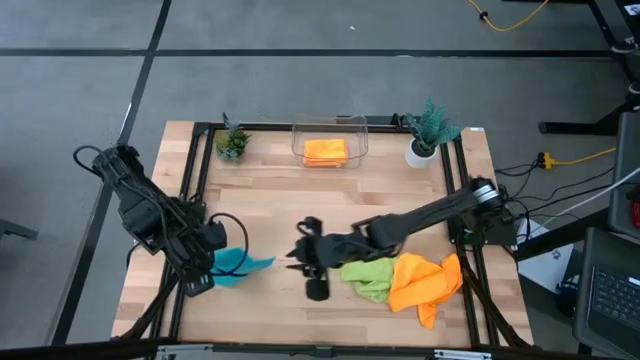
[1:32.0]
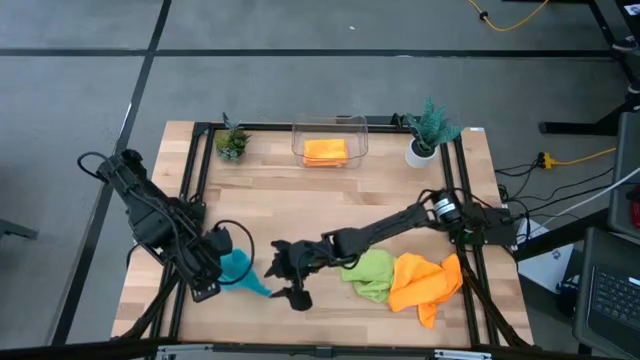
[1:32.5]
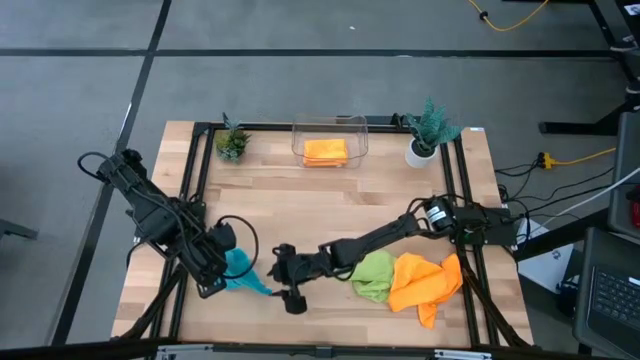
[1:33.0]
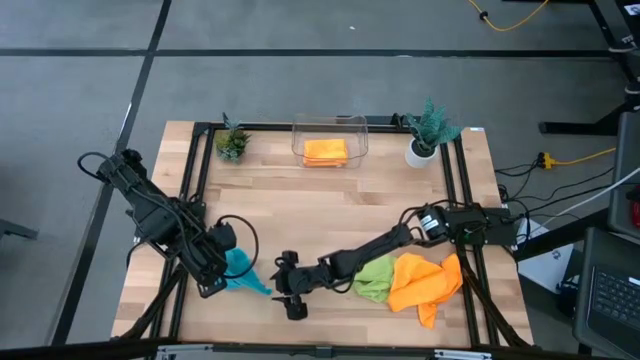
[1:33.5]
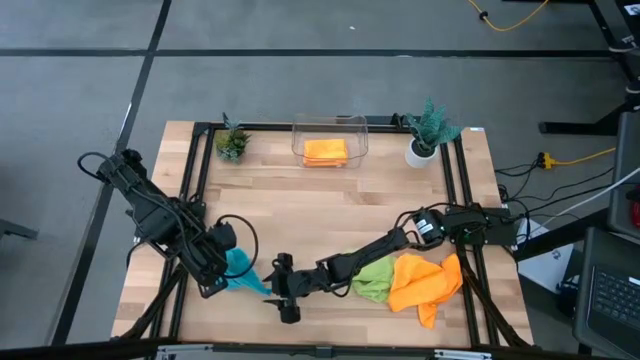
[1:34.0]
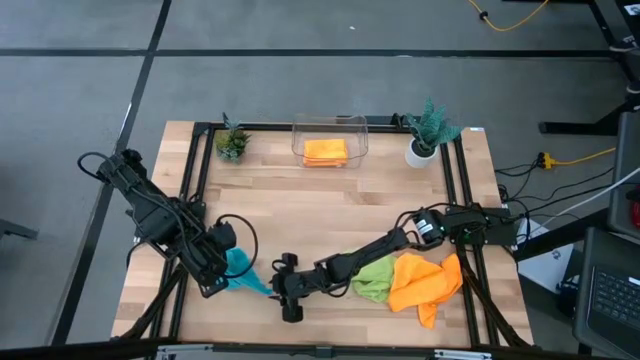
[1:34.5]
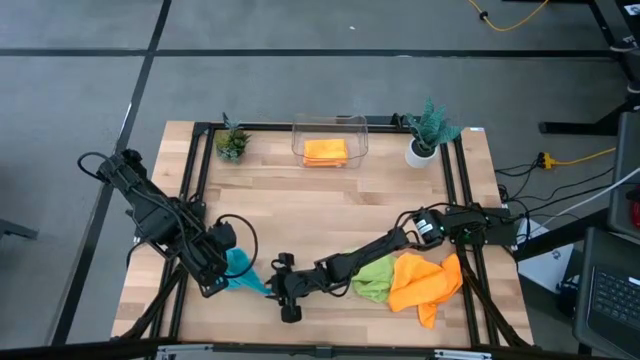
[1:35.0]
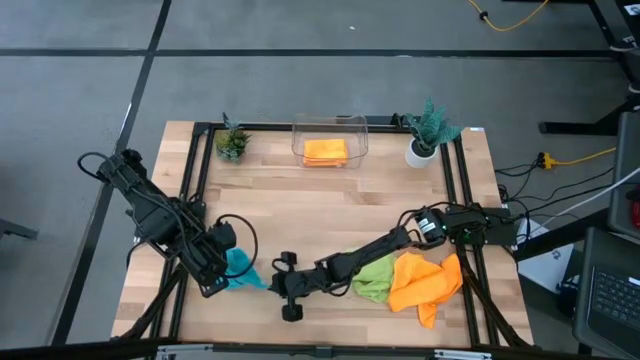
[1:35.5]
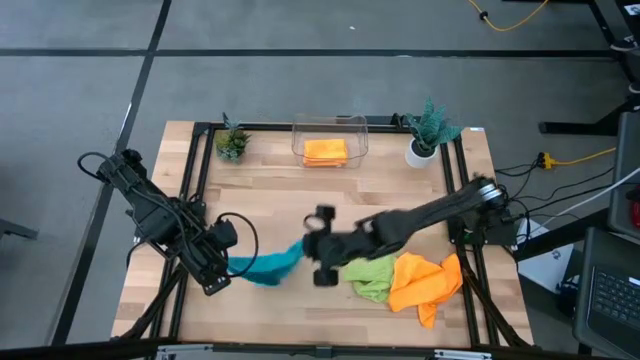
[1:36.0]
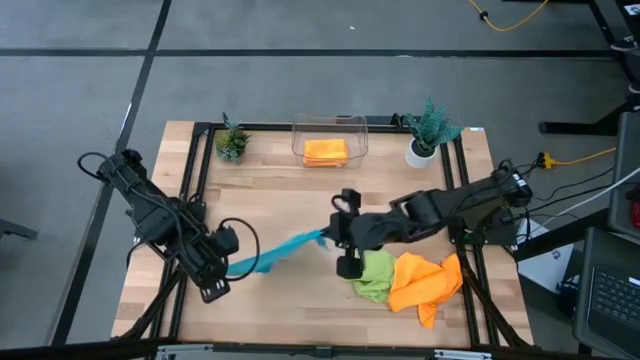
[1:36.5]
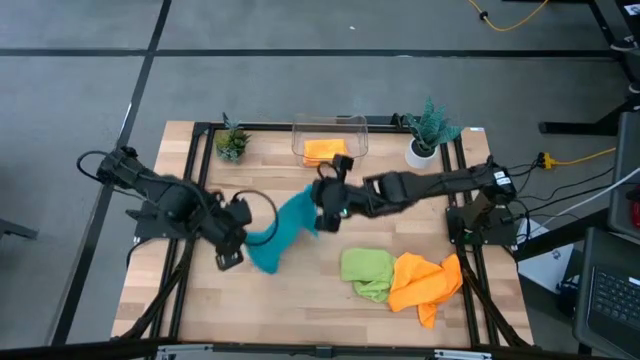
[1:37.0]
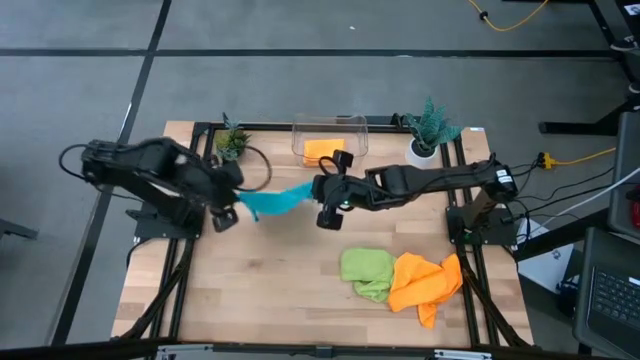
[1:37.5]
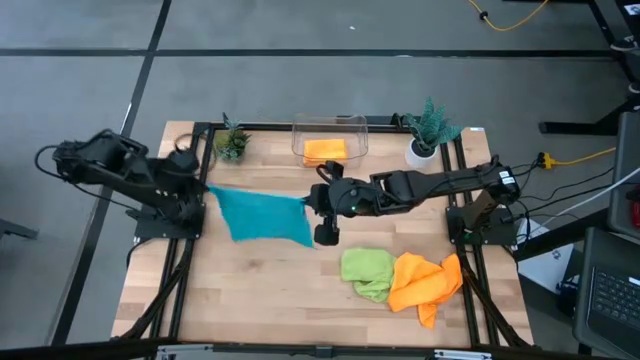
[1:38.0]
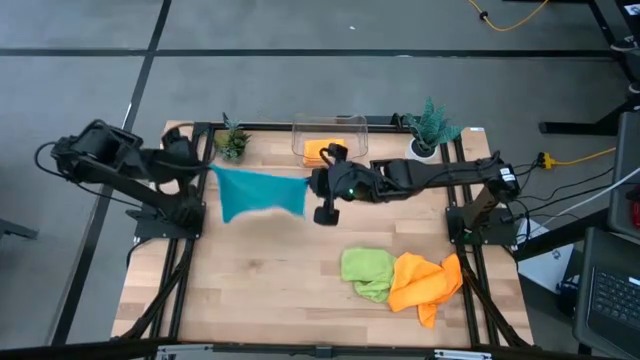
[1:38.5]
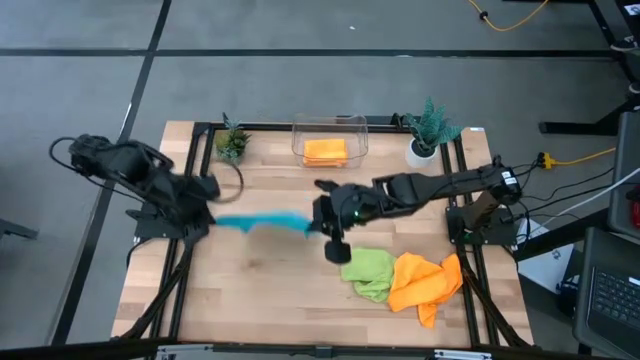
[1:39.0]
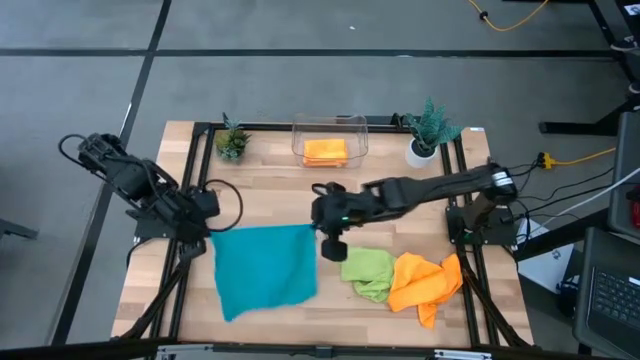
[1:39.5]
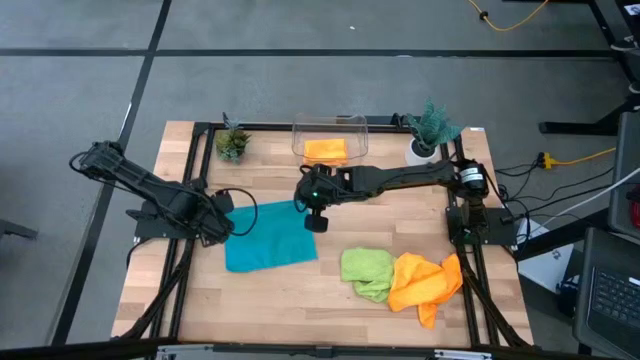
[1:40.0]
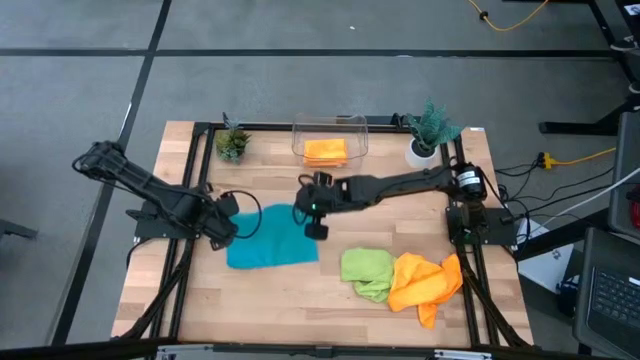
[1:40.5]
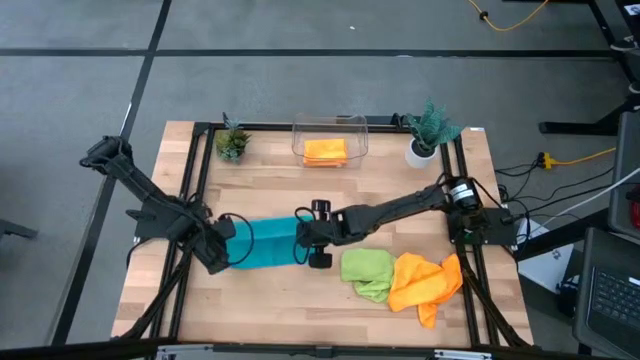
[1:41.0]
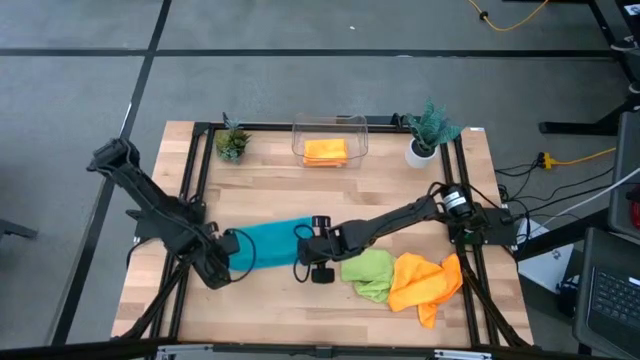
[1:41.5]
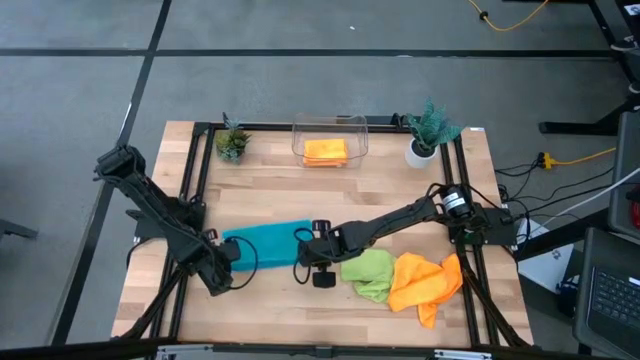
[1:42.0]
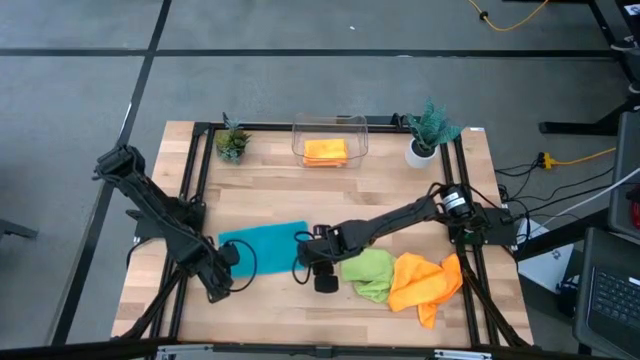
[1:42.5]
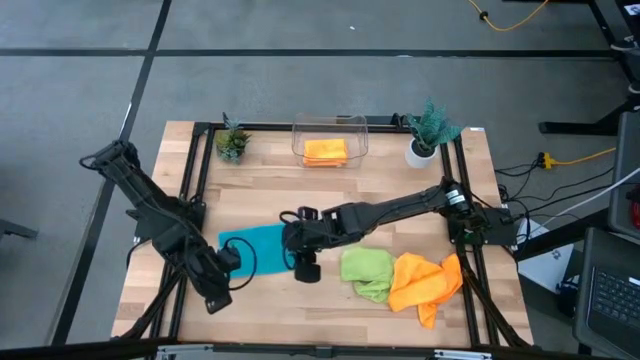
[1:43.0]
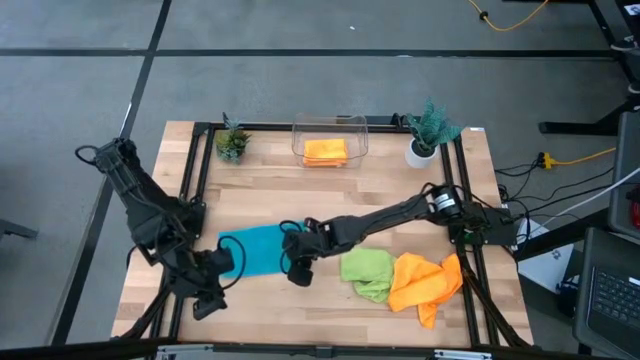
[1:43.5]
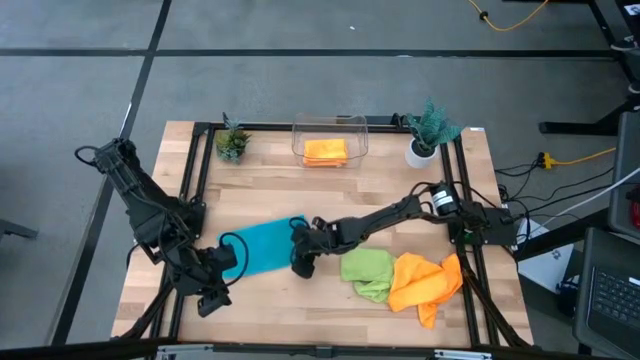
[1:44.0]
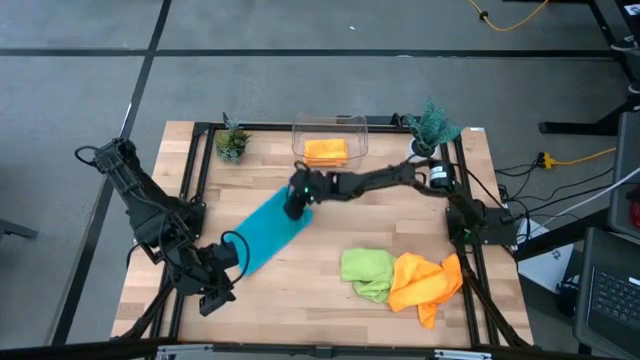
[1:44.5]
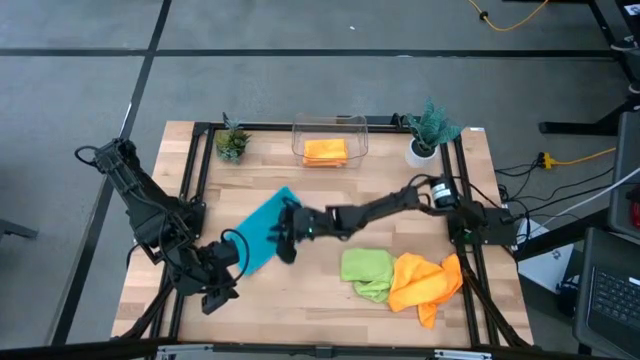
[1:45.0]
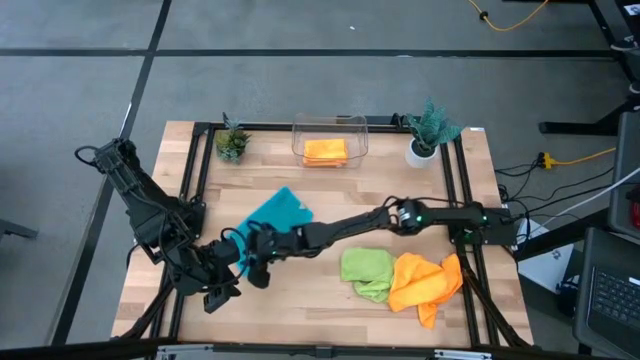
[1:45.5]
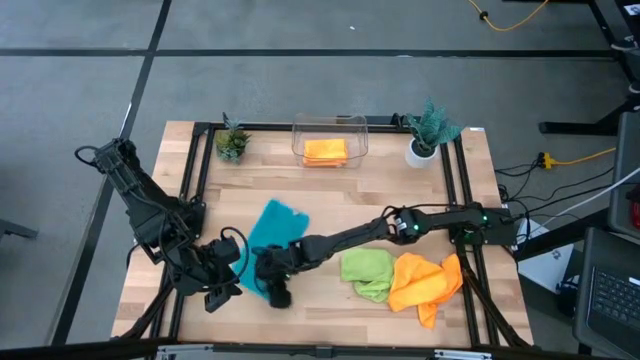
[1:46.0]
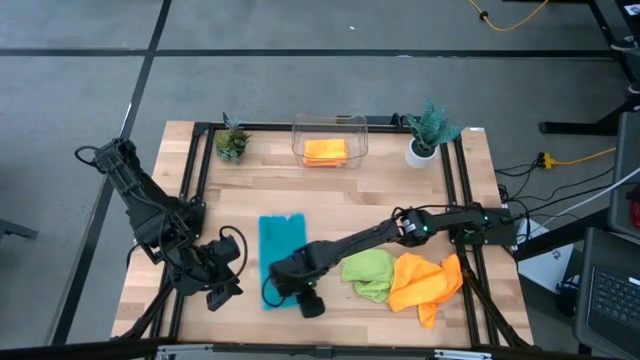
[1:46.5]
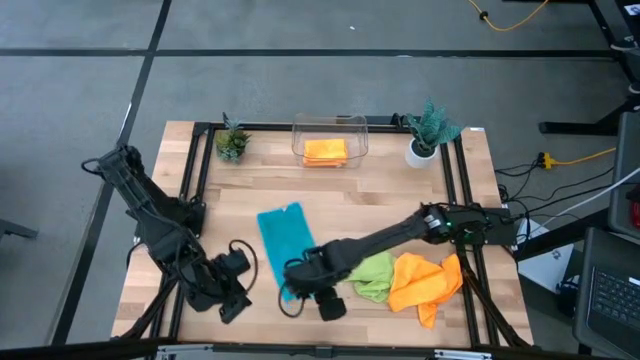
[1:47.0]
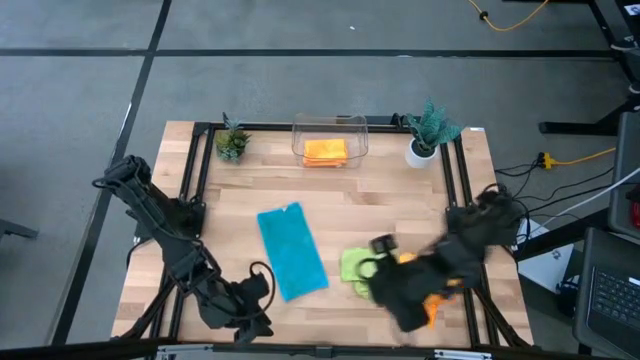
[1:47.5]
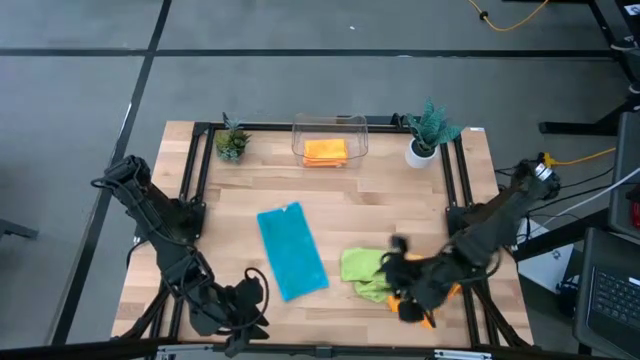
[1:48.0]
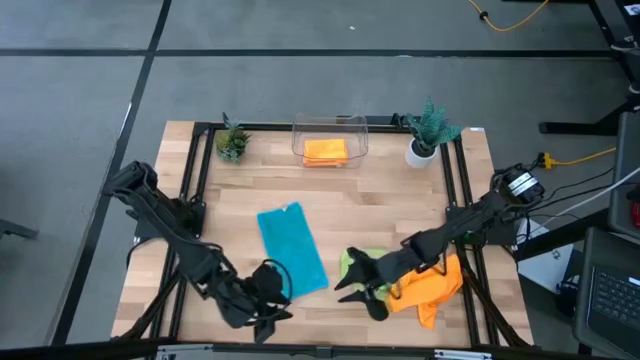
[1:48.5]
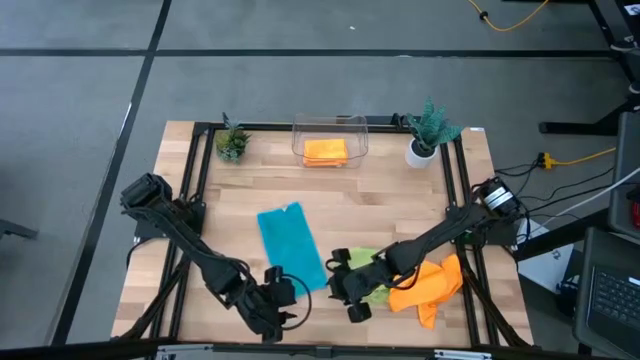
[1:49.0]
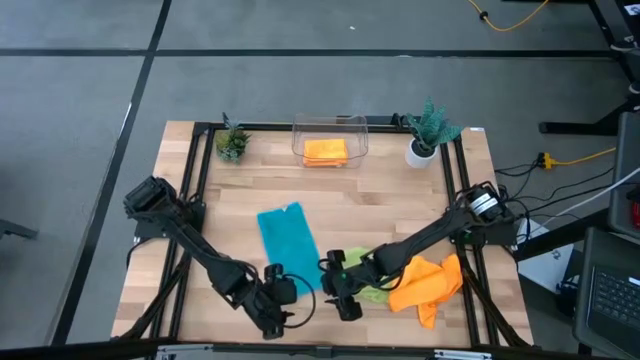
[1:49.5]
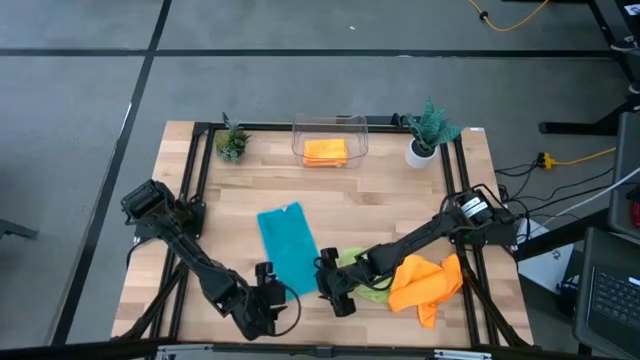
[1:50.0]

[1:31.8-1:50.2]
Task: Fold microfiber towels
Fold the blue towel

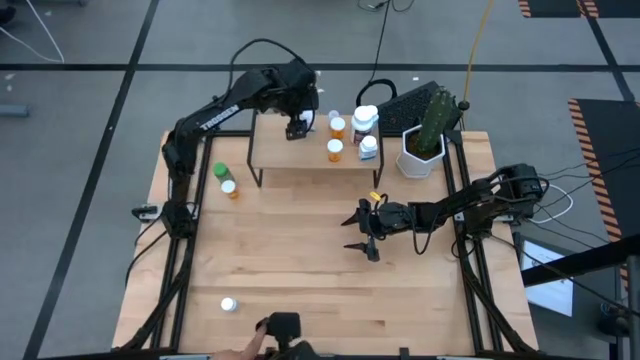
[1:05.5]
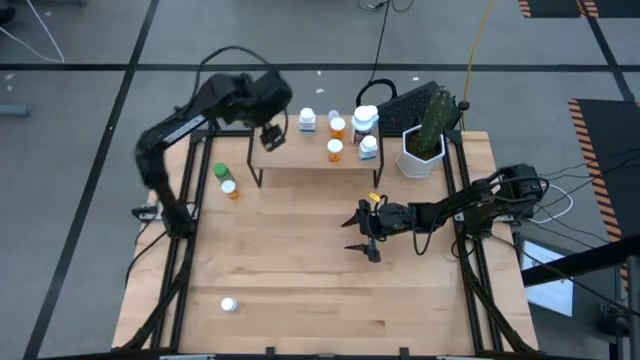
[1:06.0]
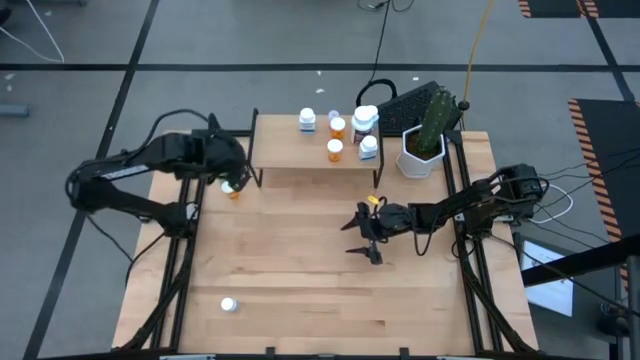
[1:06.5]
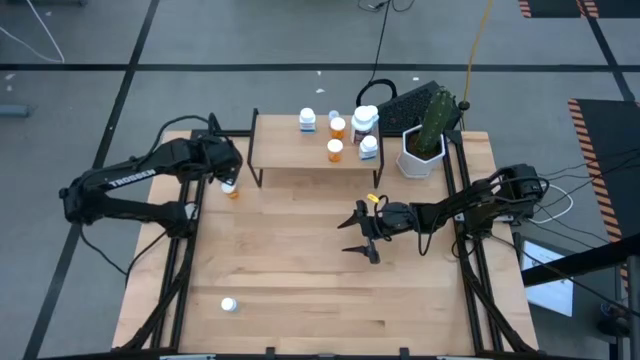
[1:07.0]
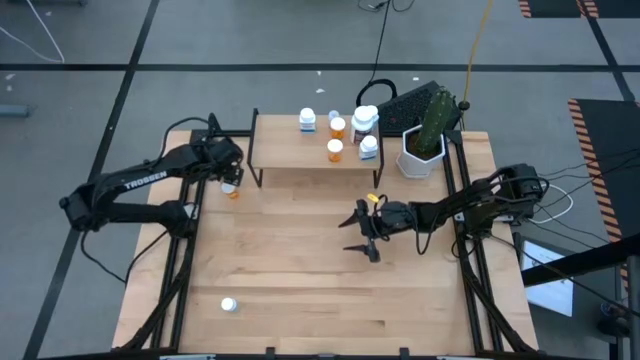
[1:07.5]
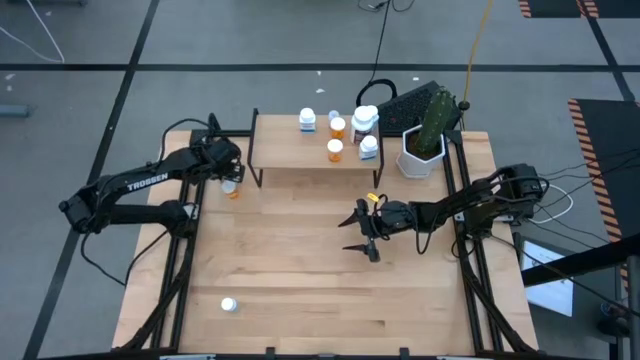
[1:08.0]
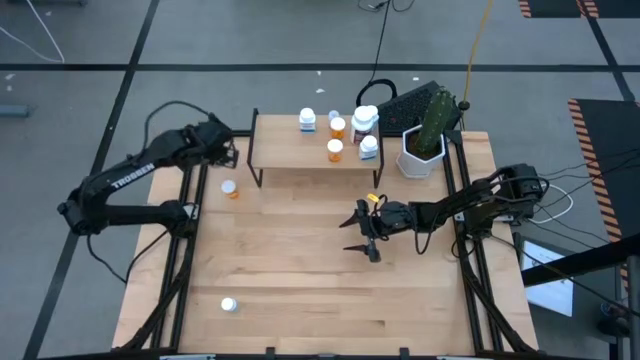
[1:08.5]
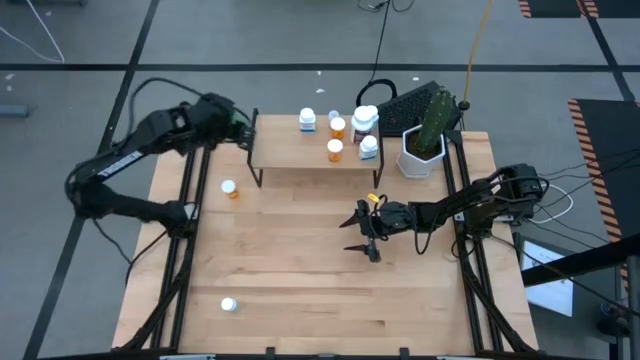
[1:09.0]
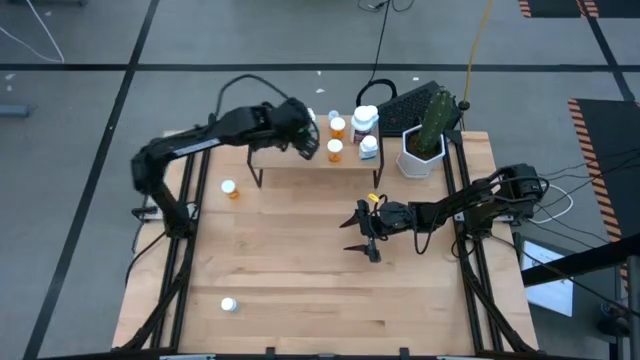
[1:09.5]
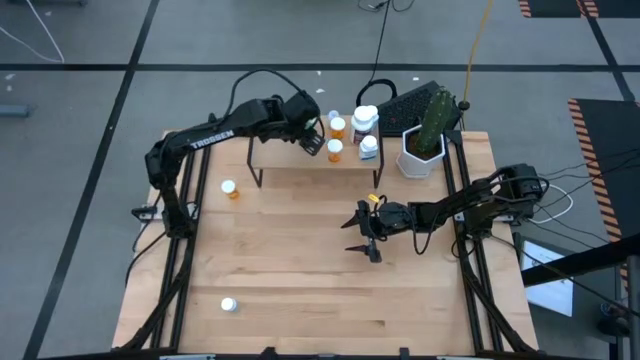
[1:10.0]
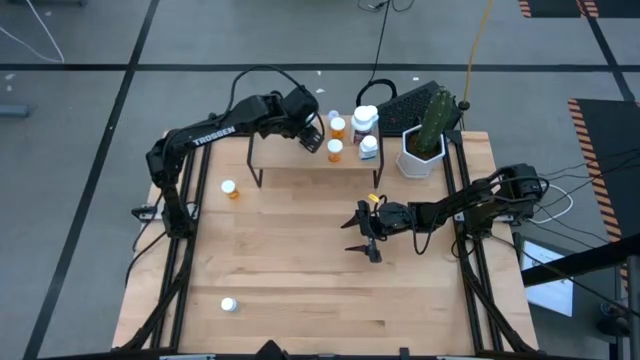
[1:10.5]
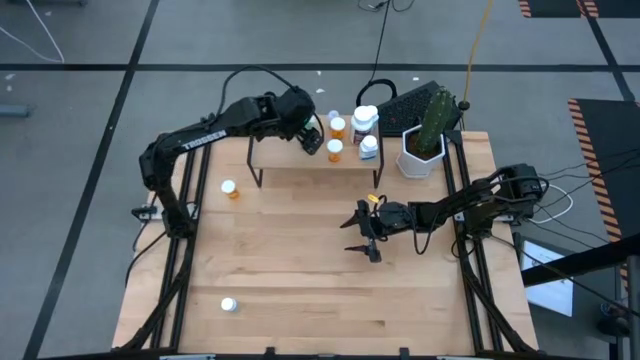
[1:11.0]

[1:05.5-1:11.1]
Task: Pick and place medicine bottles onto shelf by color
Put the green medicine bottle on the shelf
